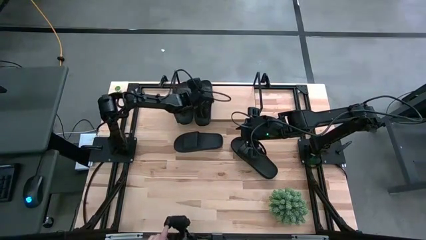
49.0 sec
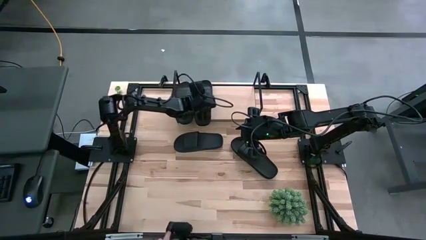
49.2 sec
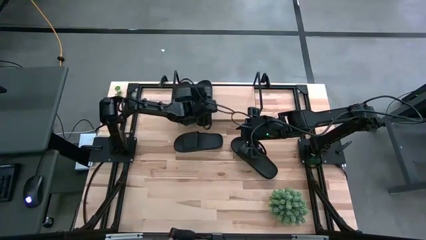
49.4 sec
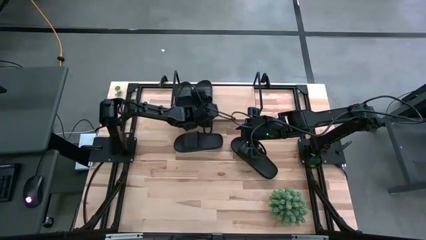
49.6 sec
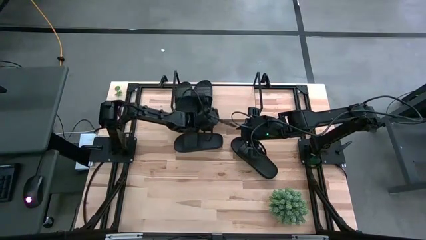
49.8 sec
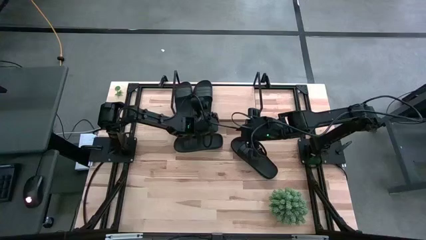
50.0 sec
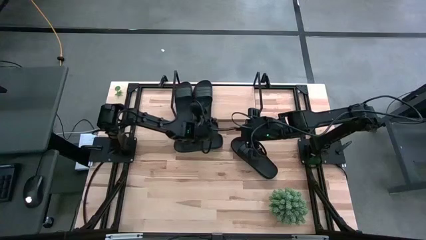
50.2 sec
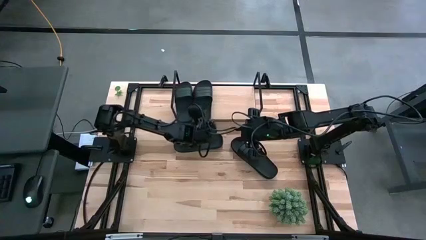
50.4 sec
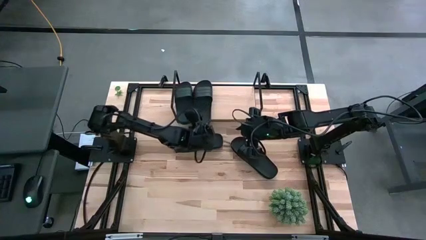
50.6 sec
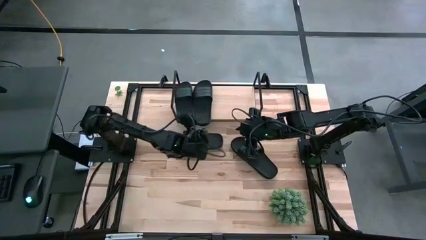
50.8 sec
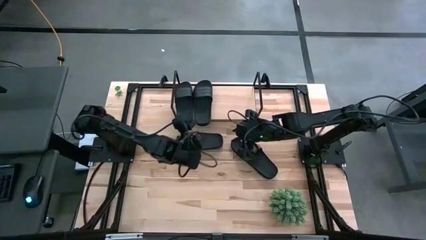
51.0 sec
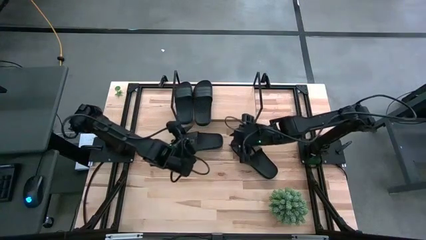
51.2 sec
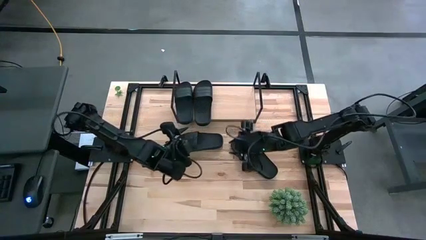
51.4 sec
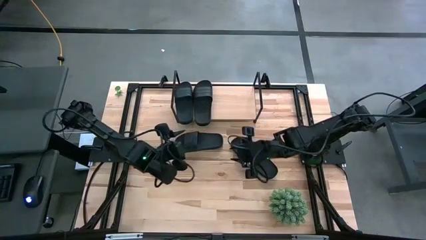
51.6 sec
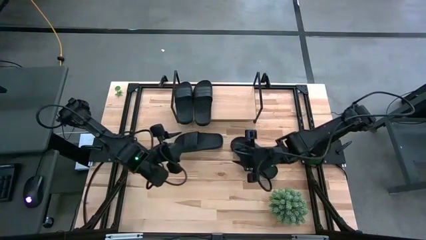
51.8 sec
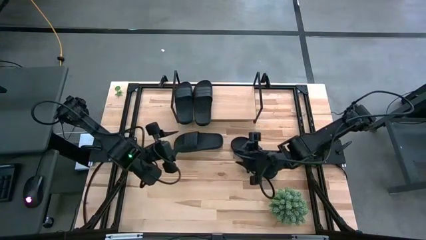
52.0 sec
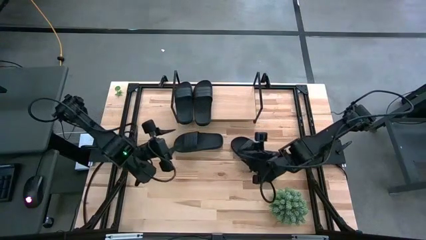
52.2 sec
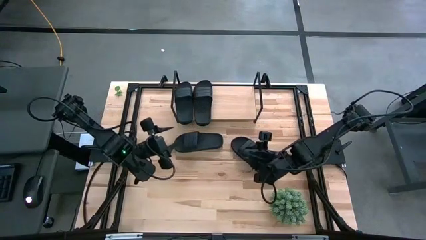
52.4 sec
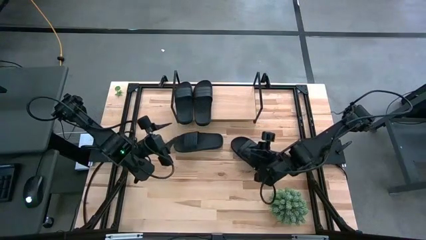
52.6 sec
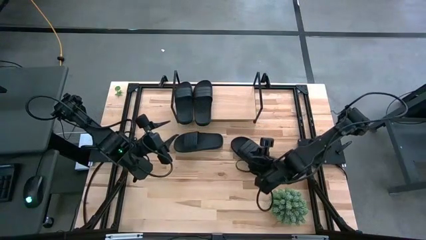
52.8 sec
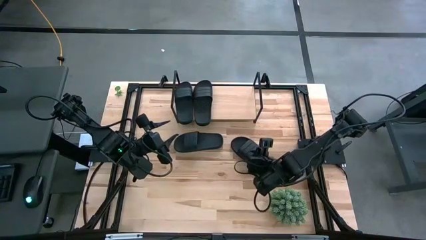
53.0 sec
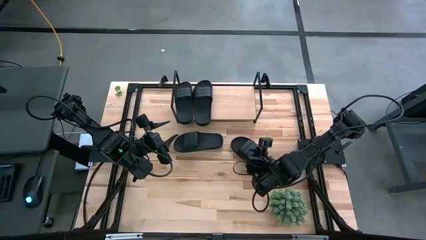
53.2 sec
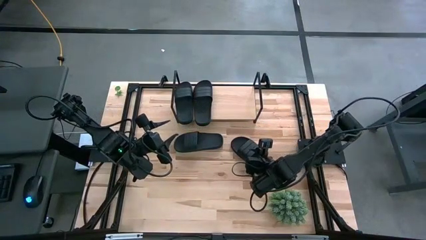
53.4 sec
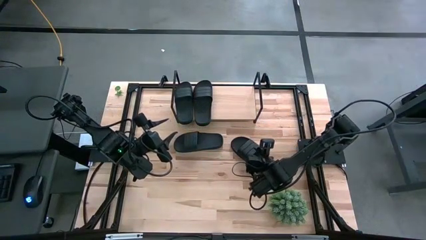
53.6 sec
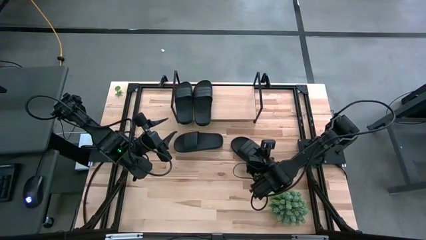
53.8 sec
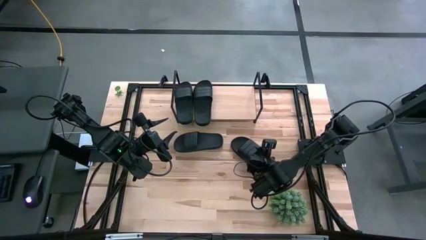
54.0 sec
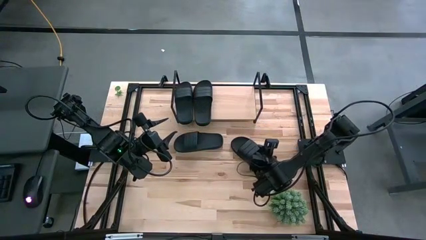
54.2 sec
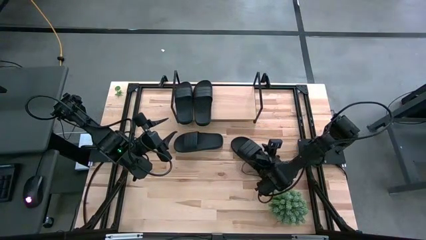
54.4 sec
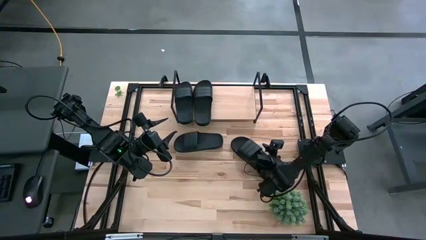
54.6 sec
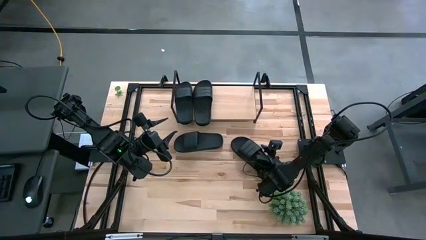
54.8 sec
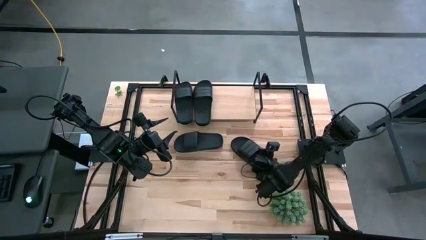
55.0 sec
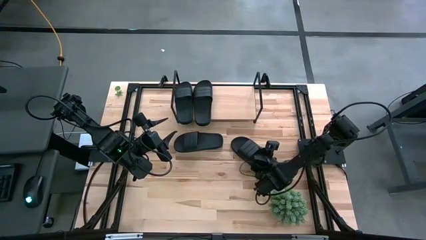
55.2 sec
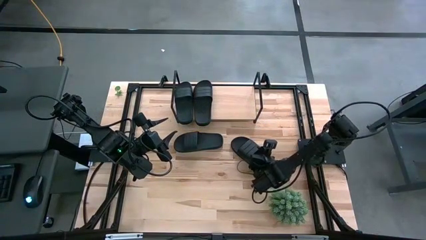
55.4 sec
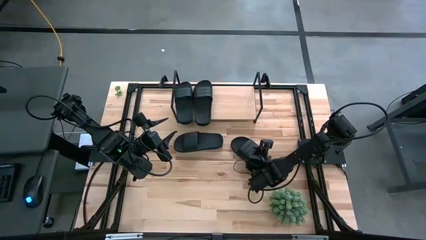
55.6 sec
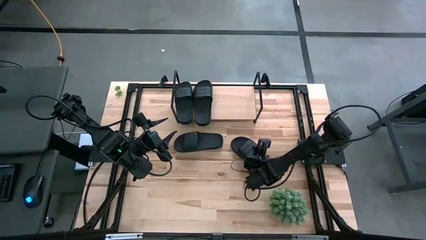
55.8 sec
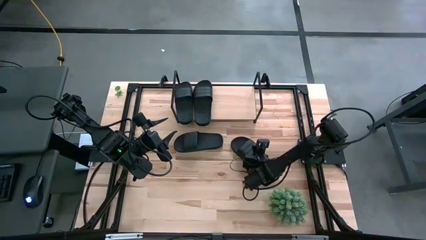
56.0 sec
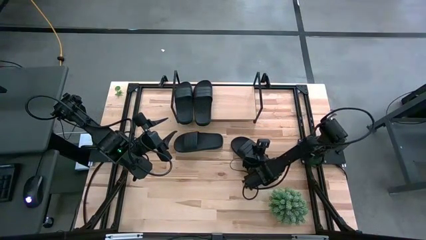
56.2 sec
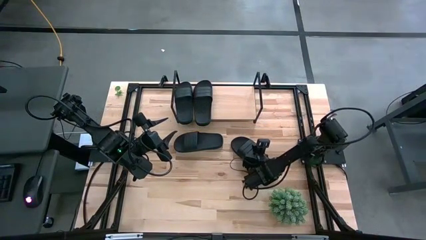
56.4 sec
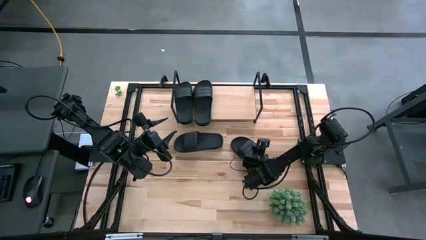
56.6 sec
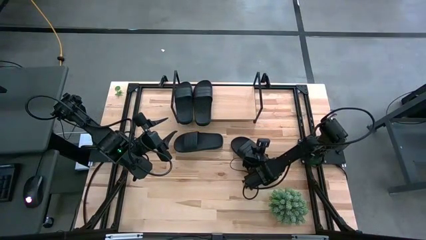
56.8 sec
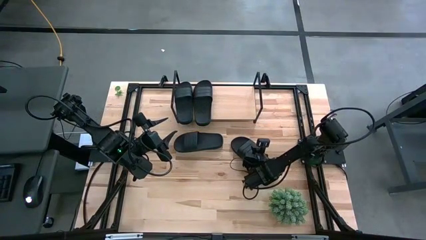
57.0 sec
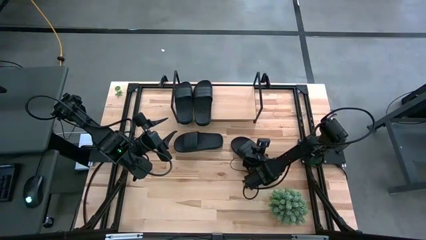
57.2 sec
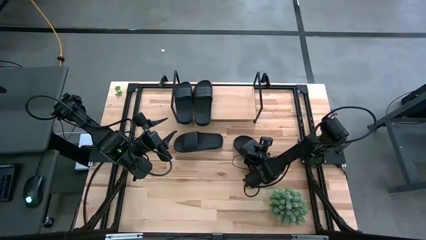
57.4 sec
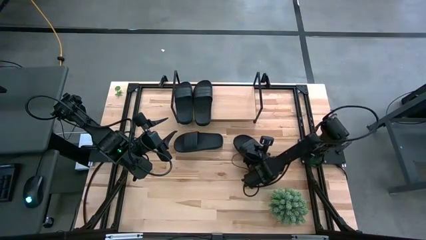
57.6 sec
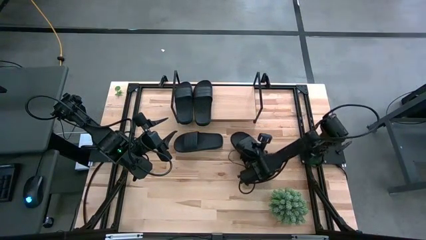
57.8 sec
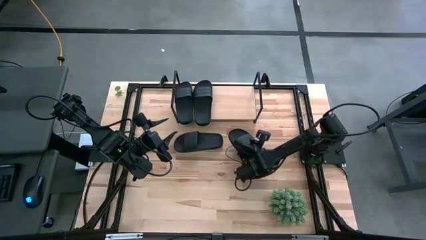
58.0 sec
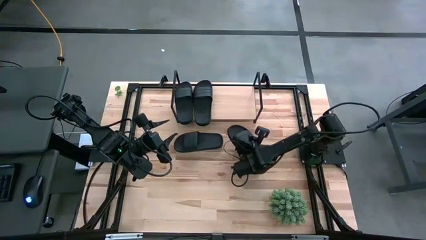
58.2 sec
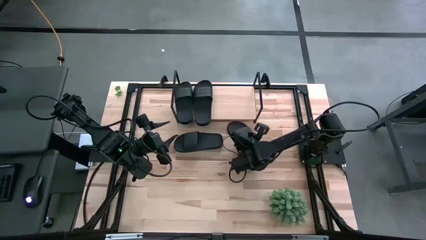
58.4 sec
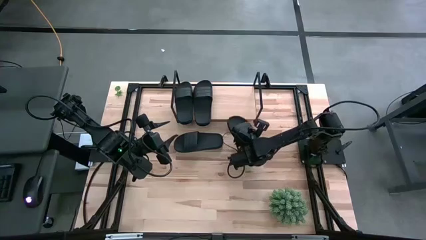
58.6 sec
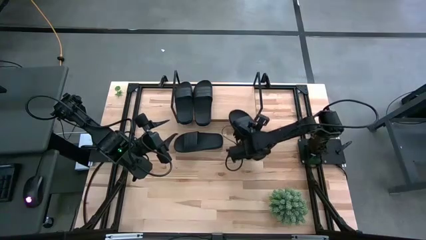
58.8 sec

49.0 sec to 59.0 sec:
Task: Pick and place slides into the shelf
Put the black slipper on the shelf
